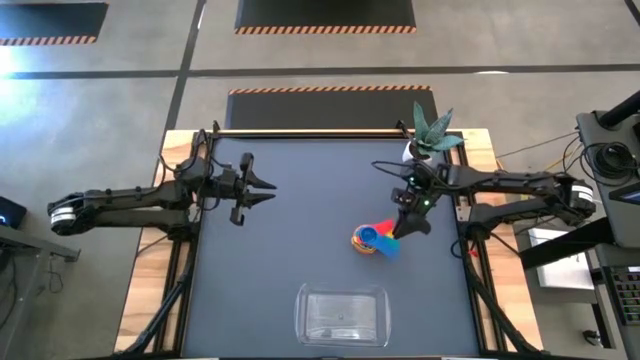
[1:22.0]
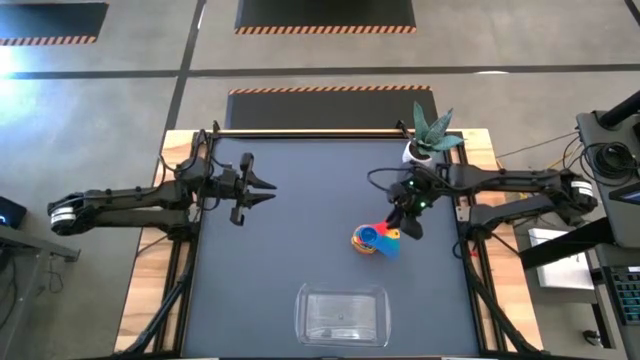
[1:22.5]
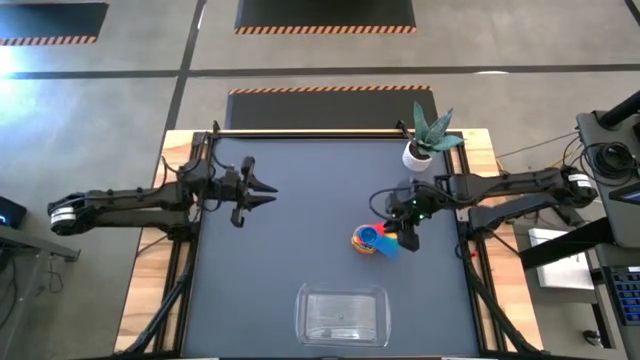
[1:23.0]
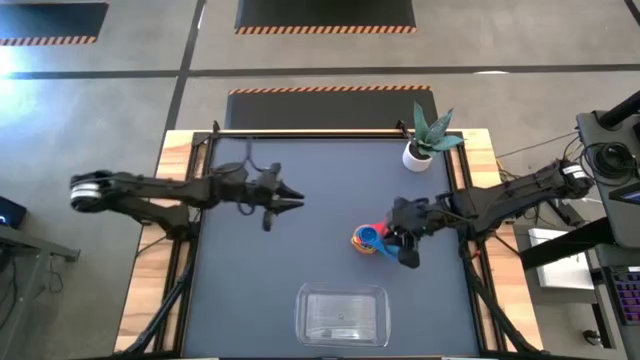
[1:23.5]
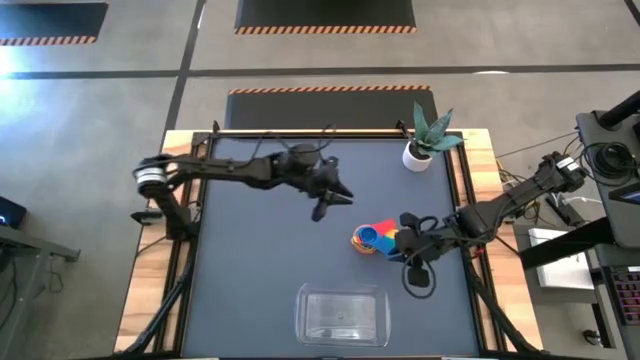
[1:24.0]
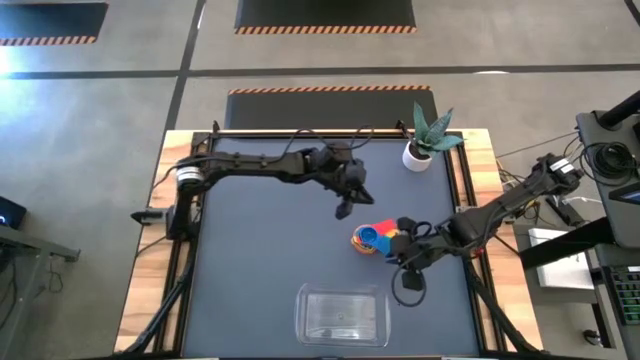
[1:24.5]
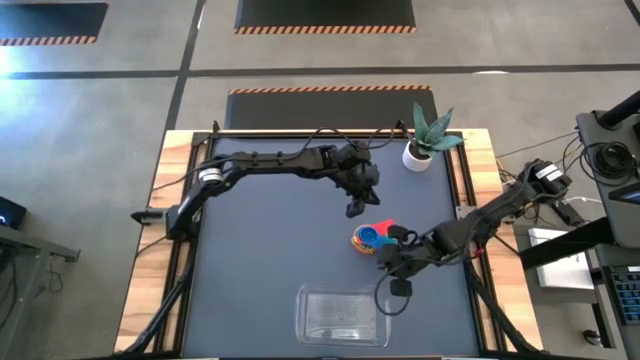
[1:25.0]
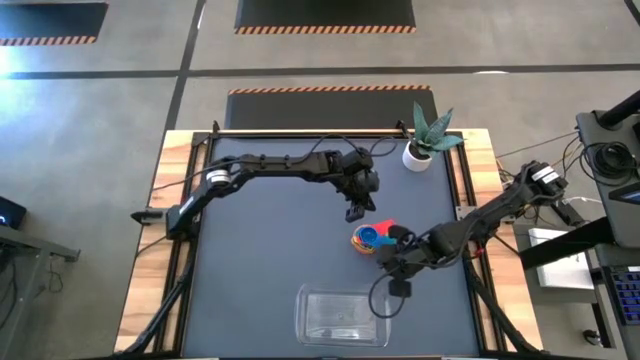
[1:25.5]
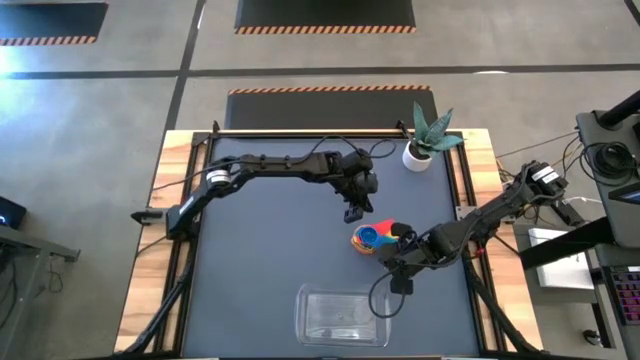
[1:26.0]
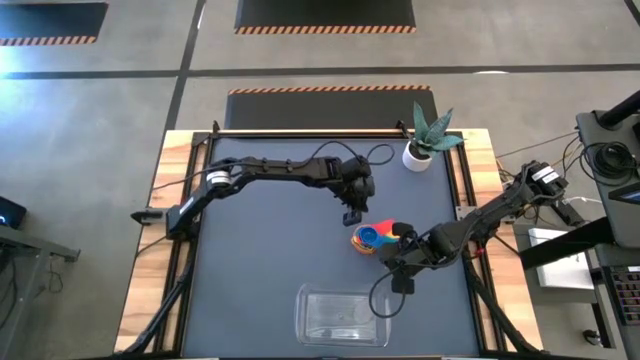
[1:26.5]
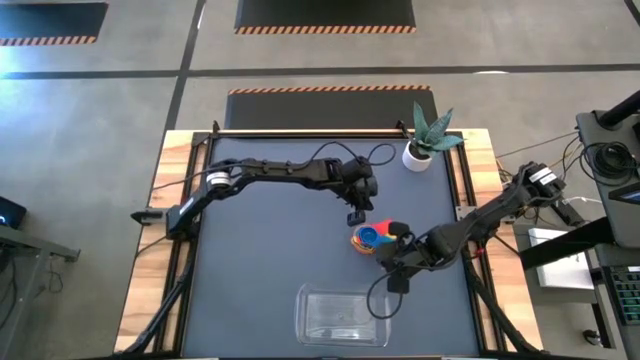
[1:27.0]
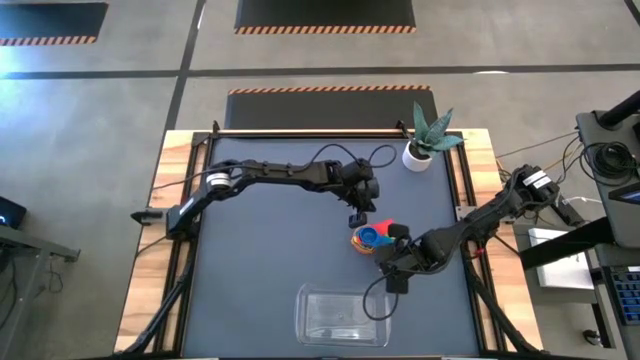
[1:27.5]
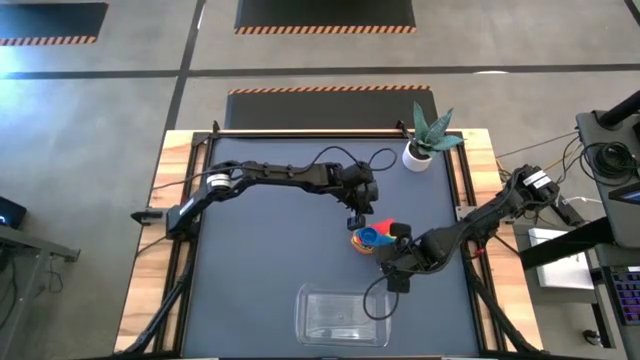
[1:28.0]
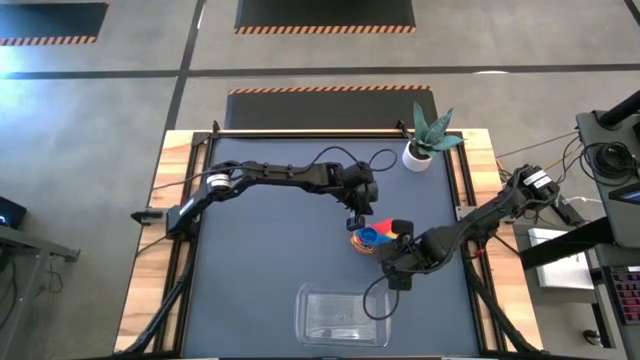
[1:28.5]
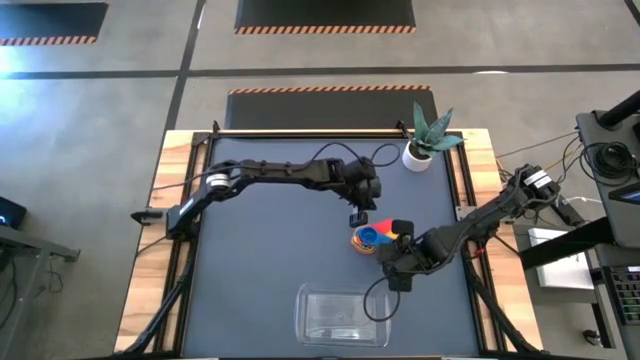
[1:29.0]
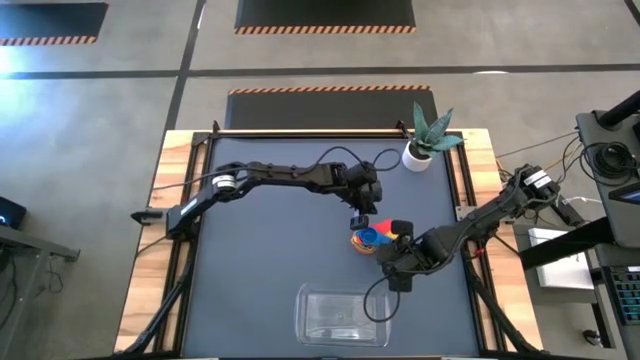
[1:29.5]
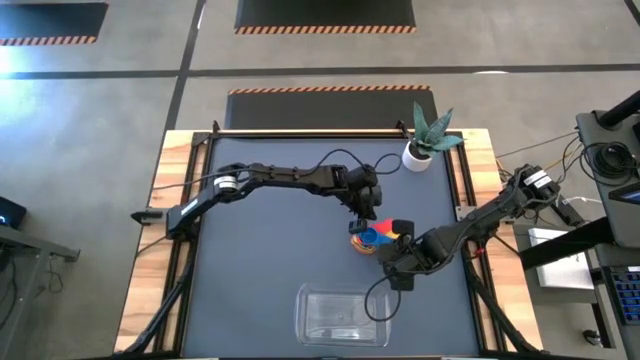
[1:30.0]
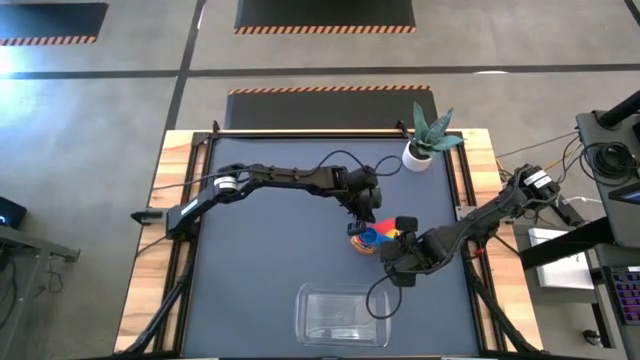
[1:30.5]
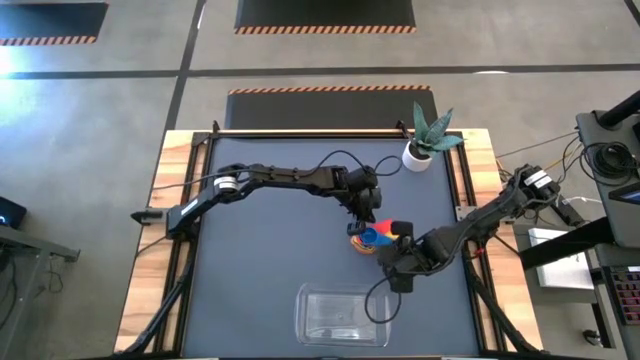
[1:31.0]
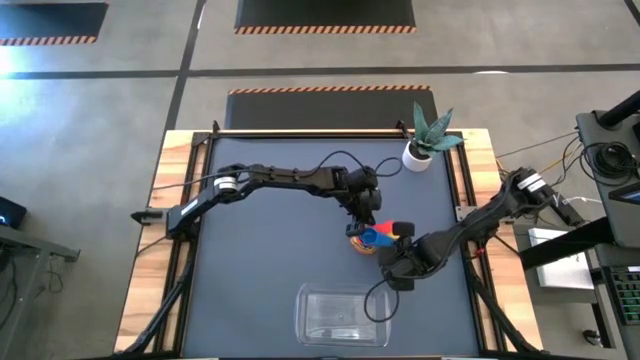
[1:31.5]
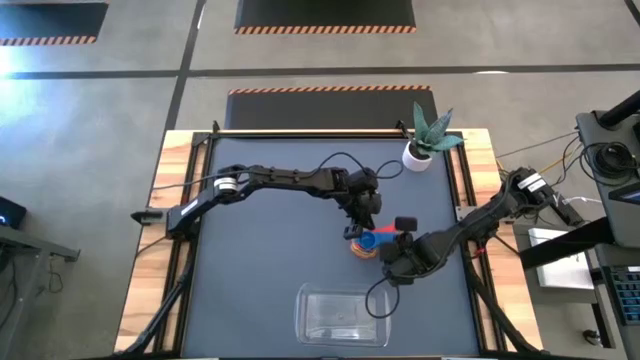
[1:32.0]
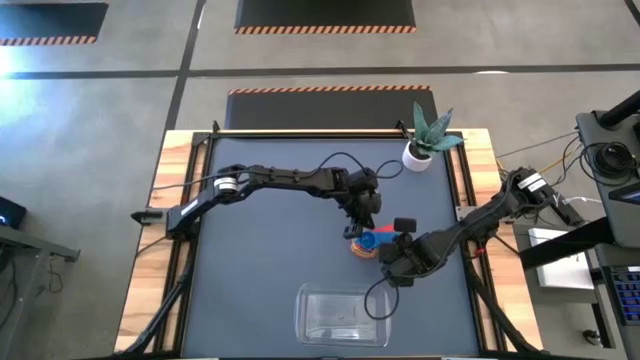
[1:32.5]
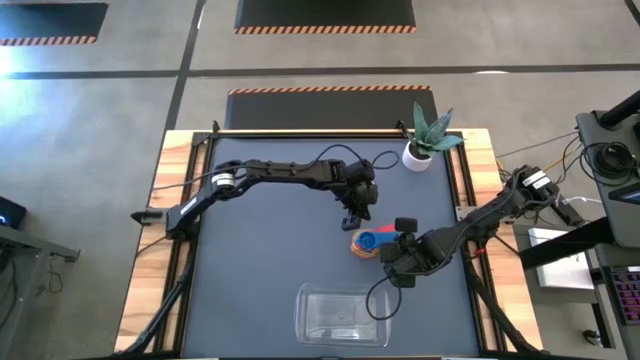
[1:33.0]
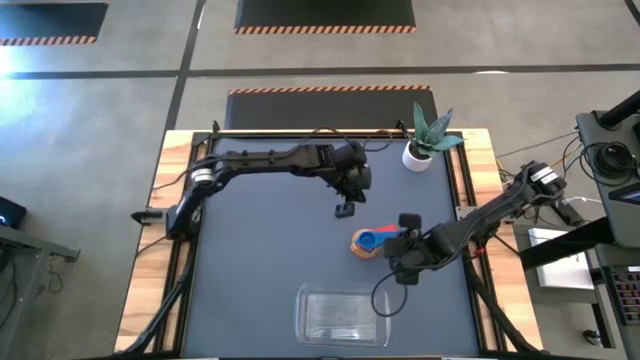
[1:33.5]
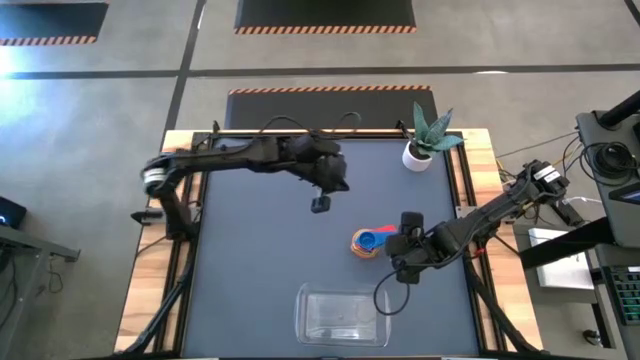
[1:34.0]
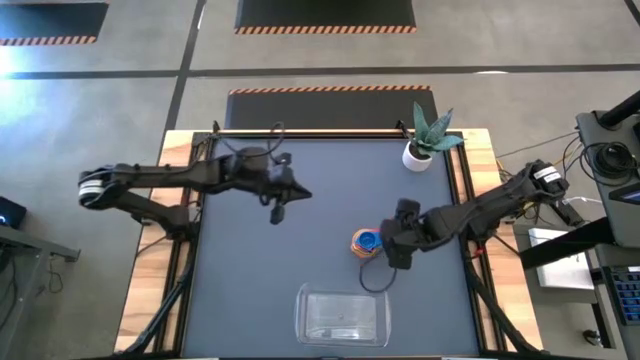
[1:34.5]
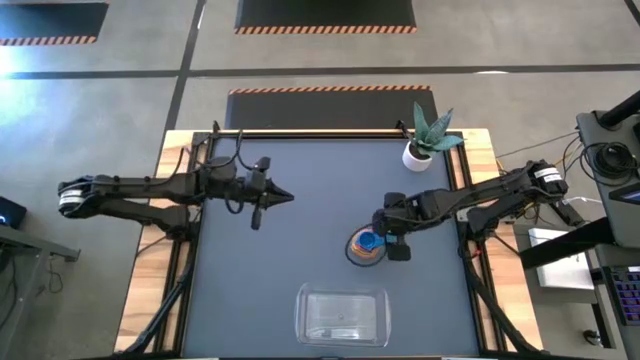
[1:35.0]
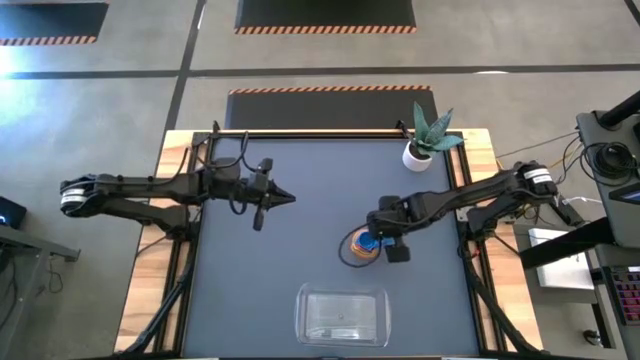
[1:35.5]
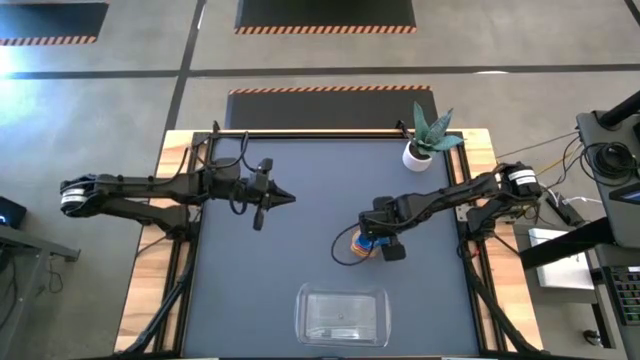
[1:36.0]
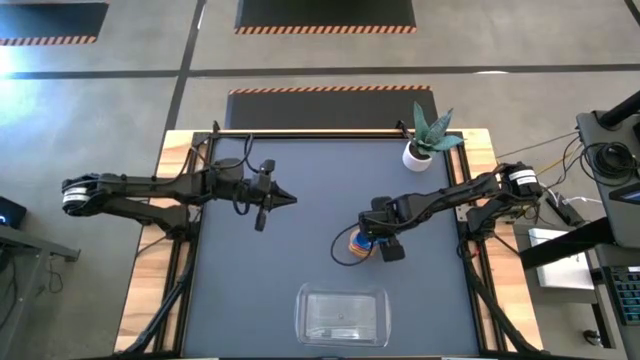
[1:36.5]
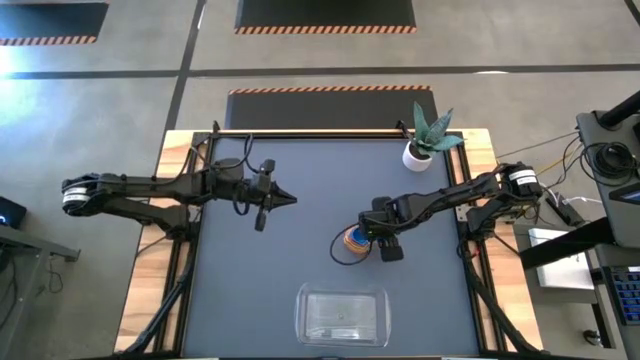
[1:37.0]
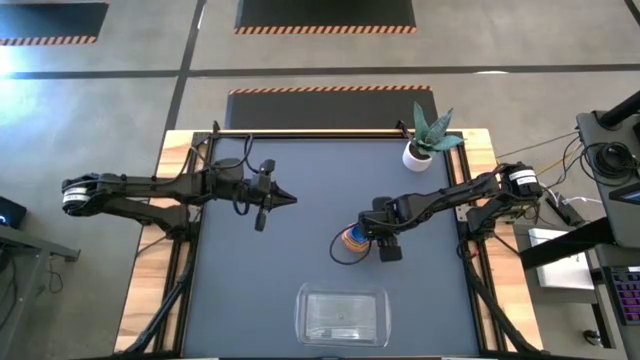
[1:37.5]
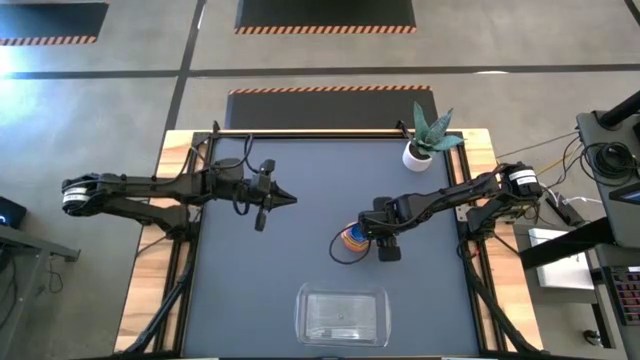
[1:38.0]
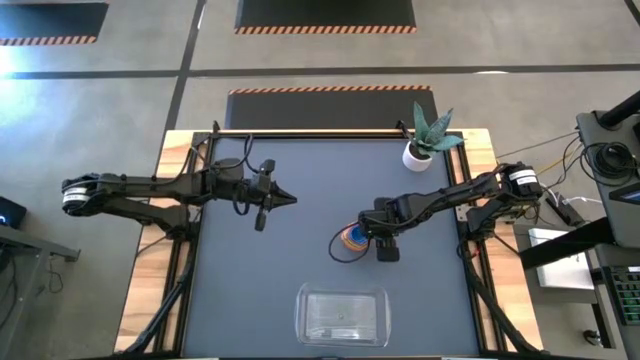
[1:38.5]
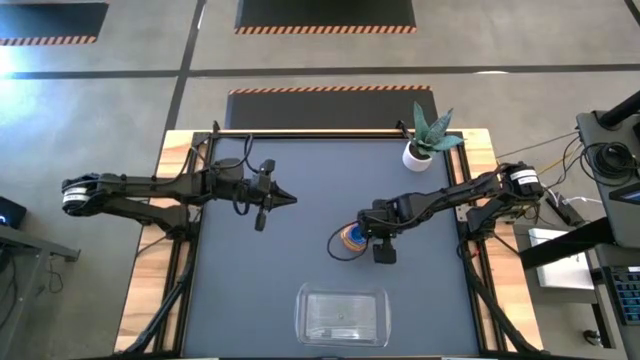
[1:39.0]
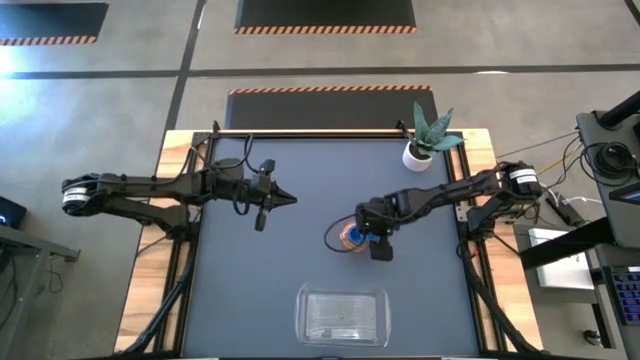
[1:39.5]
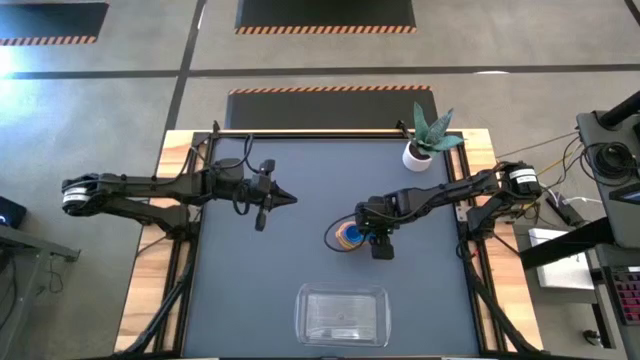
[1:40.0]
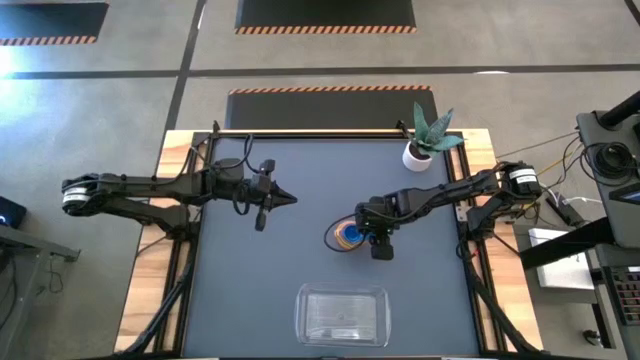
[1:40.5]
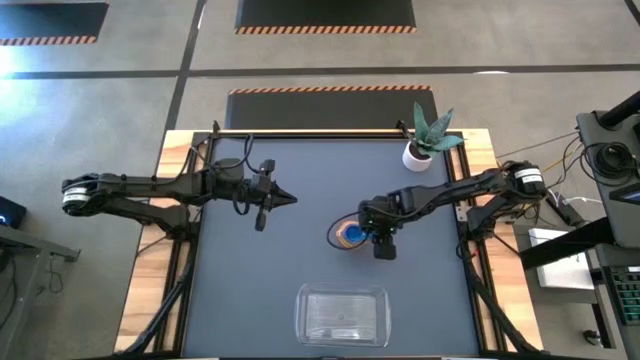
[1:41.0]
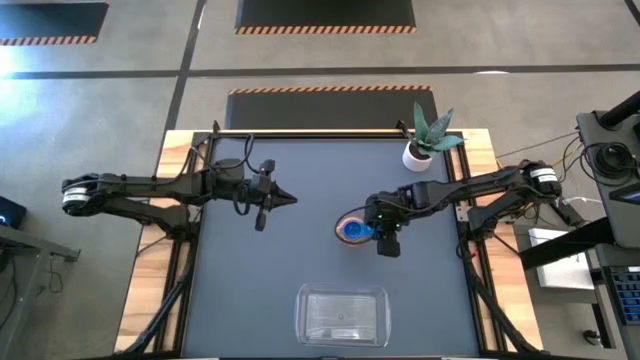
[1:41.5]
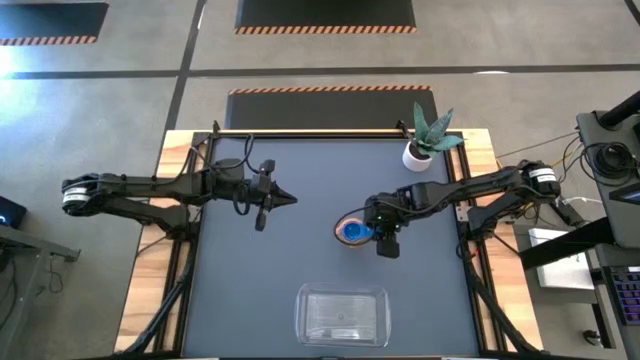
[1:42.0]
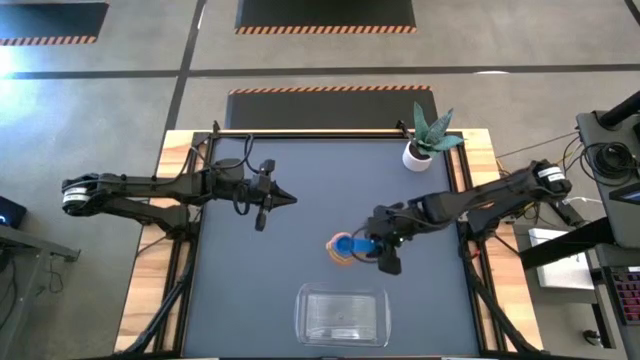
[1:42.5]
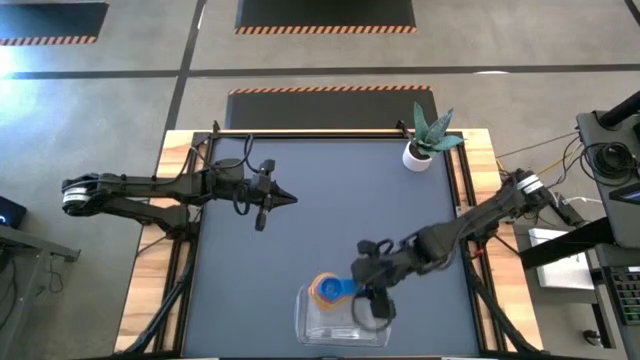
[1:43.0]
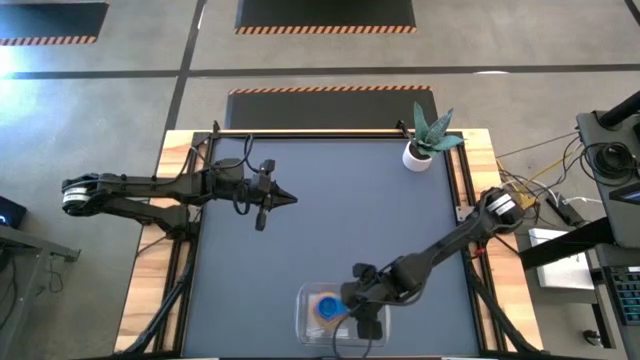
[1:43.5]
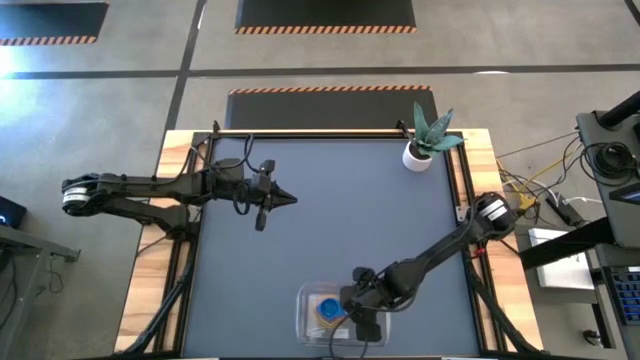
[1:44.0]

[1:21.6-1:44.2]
Task: Nest measuring cups in basket
Put the all measuring cups into the bin
